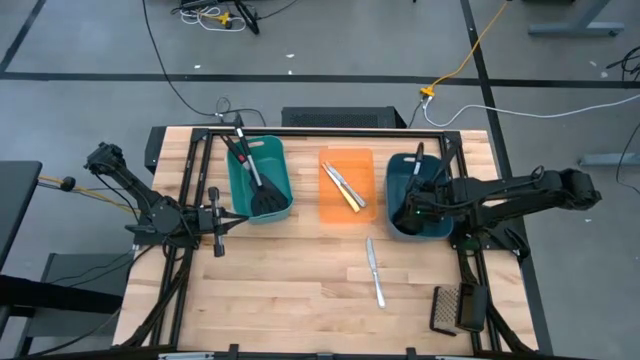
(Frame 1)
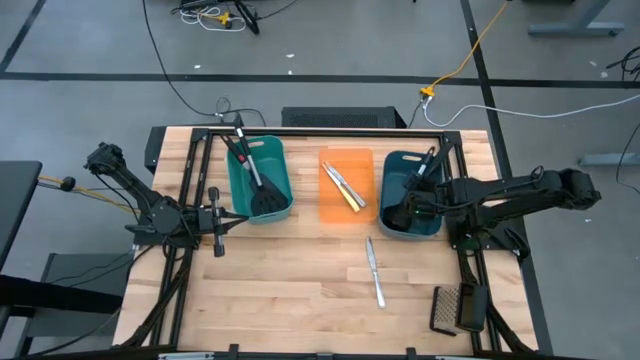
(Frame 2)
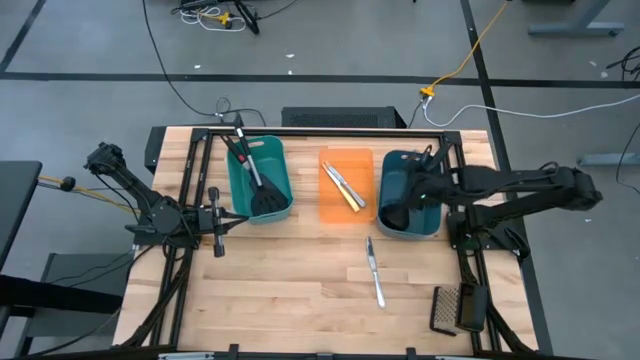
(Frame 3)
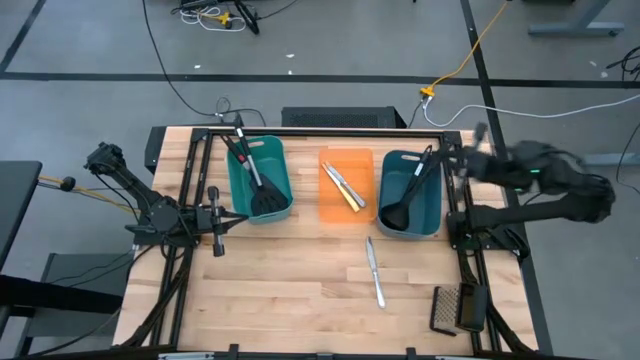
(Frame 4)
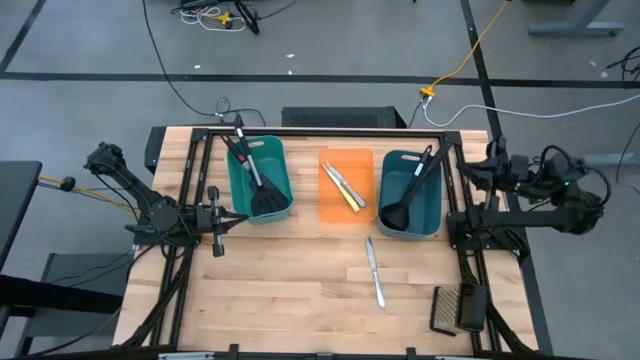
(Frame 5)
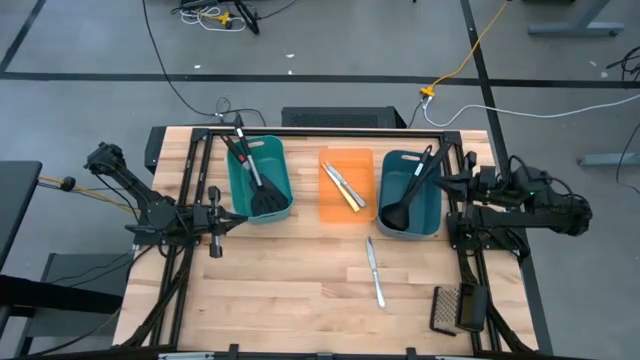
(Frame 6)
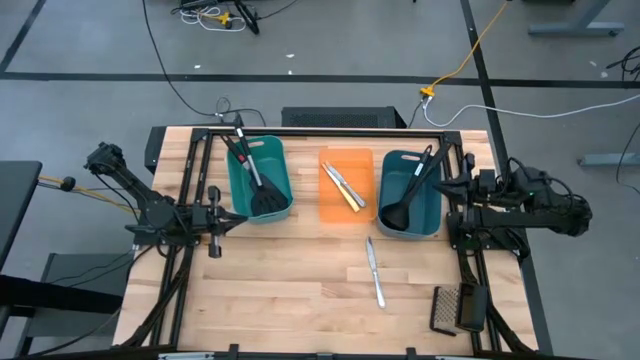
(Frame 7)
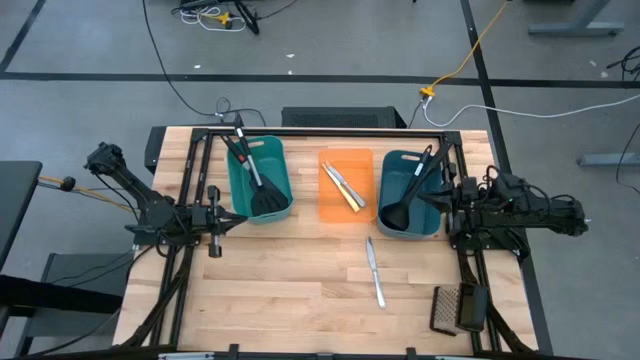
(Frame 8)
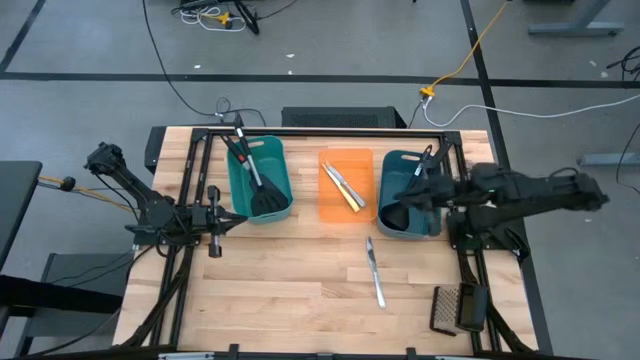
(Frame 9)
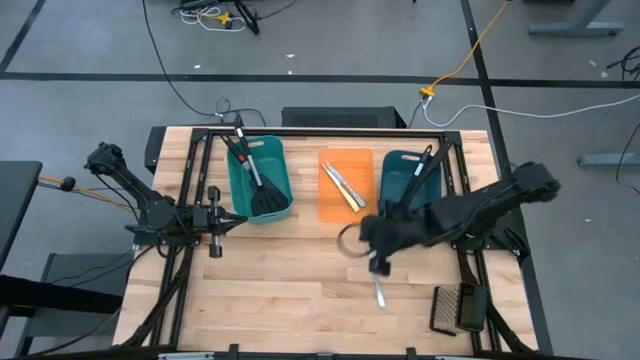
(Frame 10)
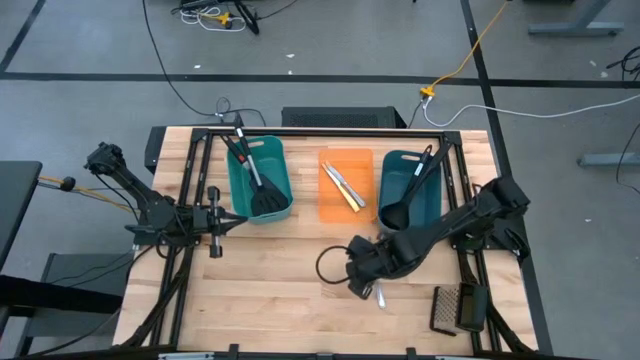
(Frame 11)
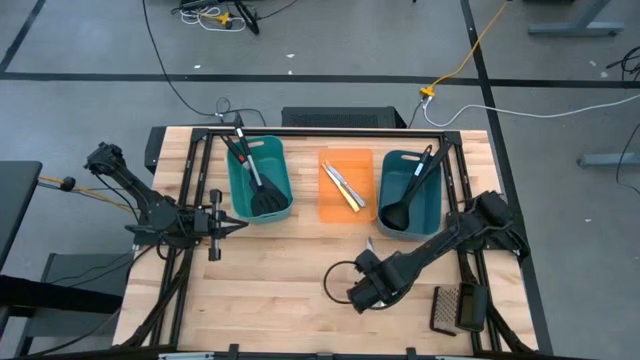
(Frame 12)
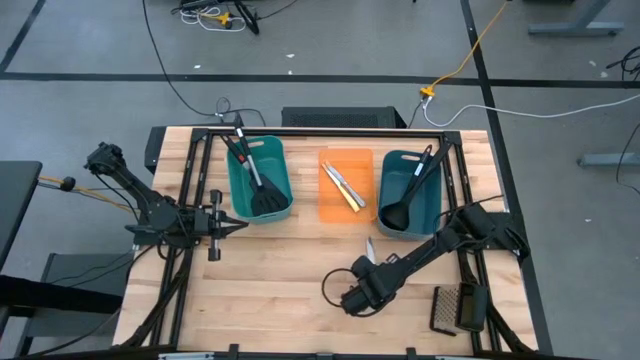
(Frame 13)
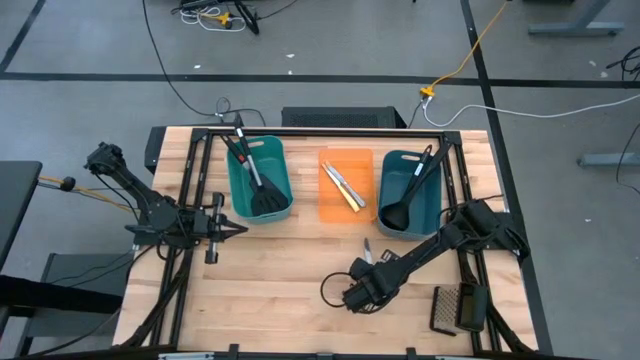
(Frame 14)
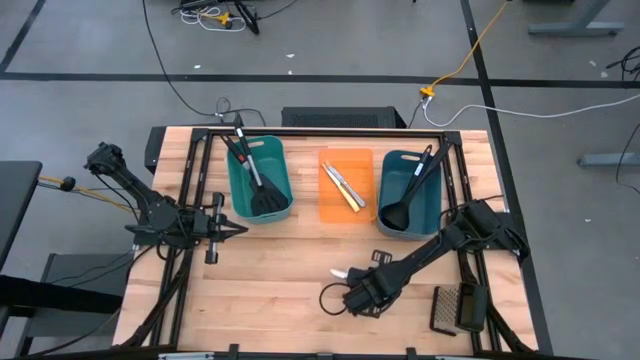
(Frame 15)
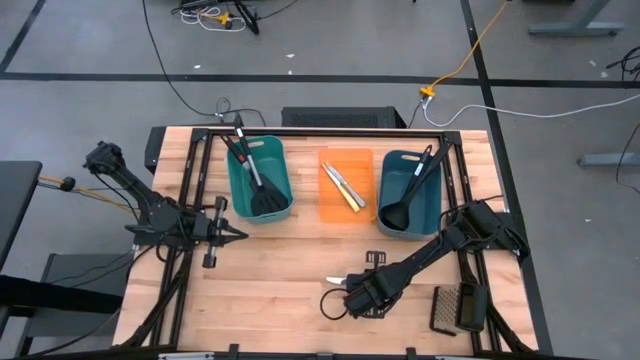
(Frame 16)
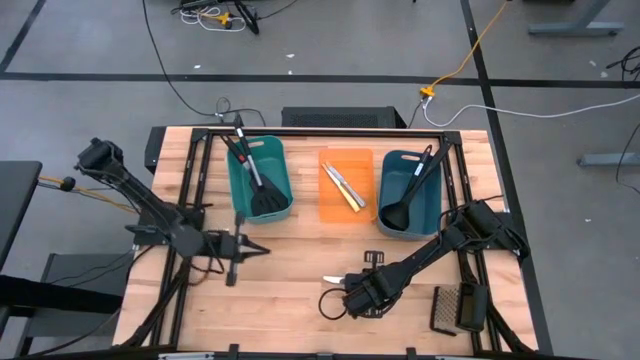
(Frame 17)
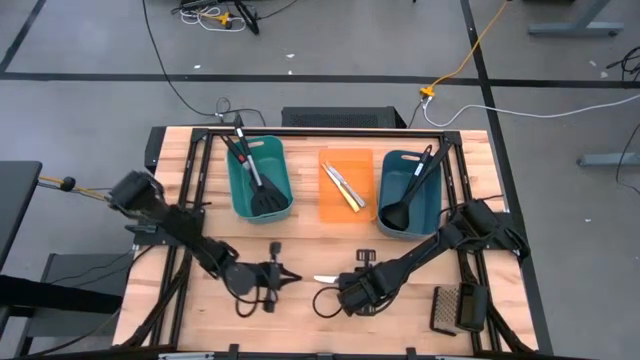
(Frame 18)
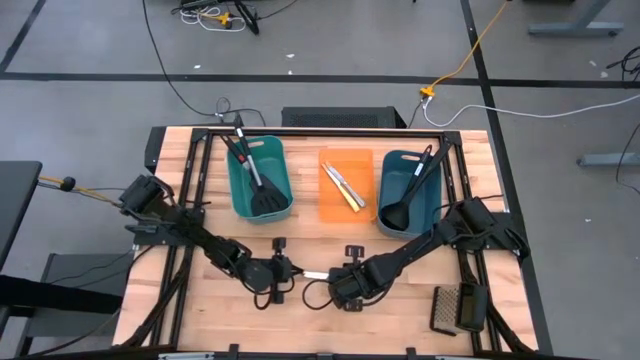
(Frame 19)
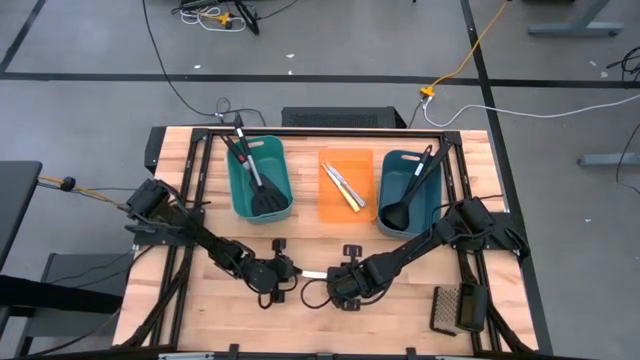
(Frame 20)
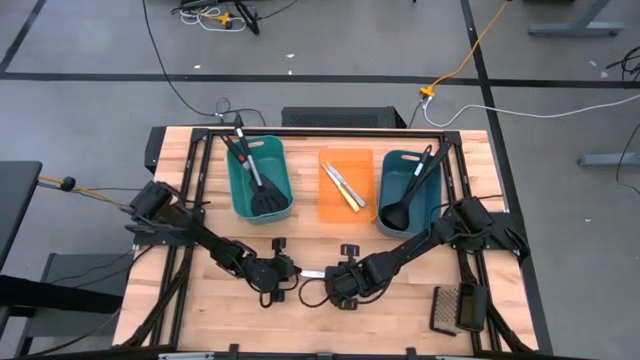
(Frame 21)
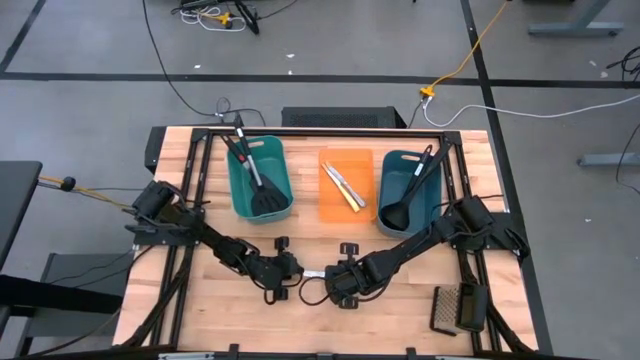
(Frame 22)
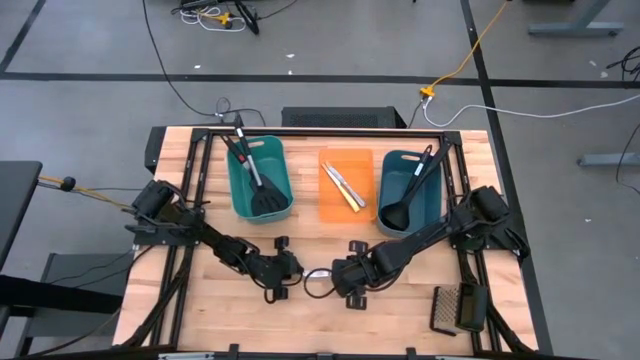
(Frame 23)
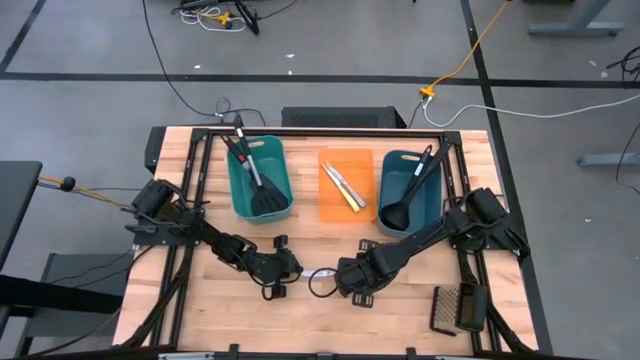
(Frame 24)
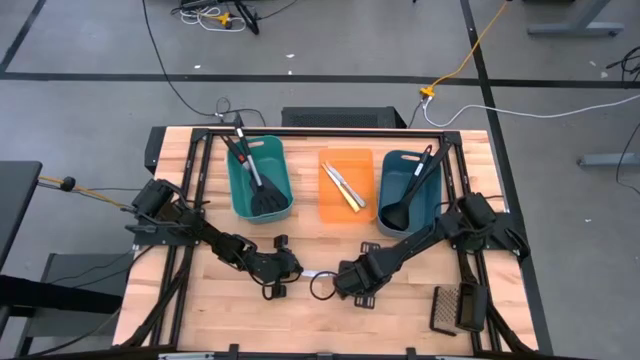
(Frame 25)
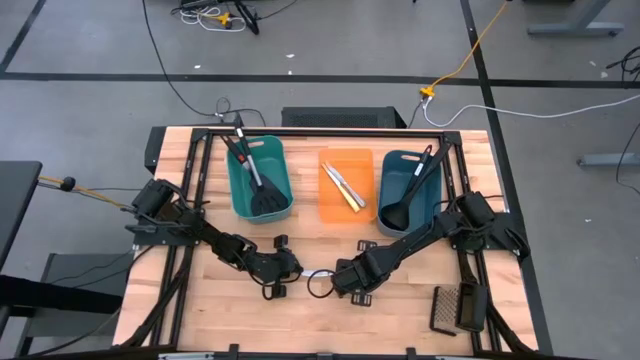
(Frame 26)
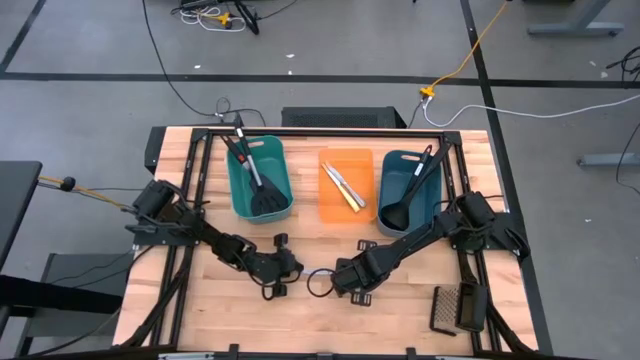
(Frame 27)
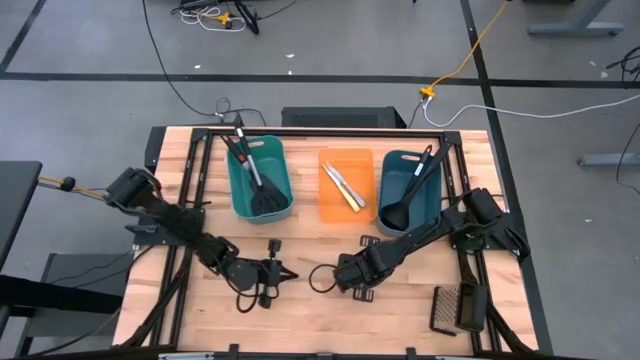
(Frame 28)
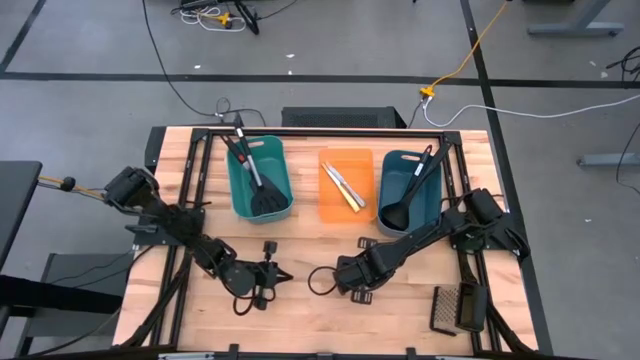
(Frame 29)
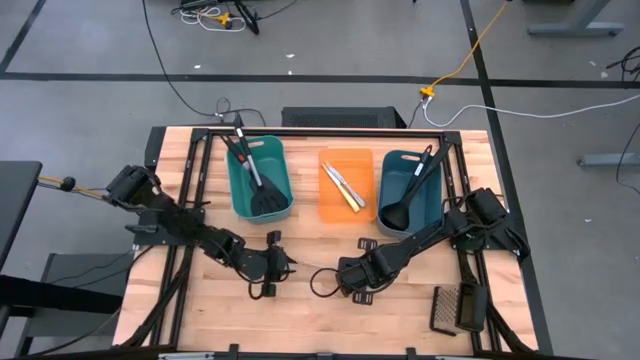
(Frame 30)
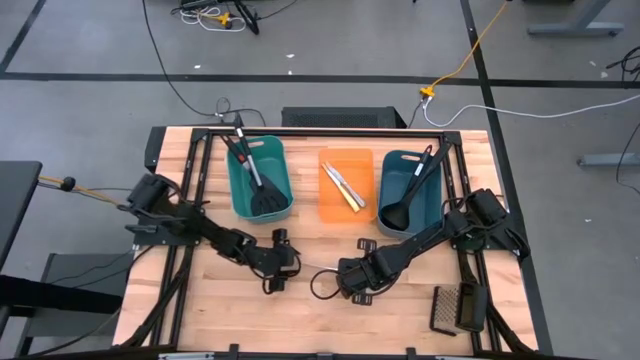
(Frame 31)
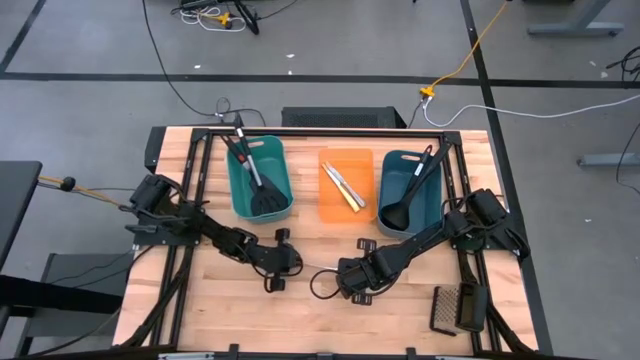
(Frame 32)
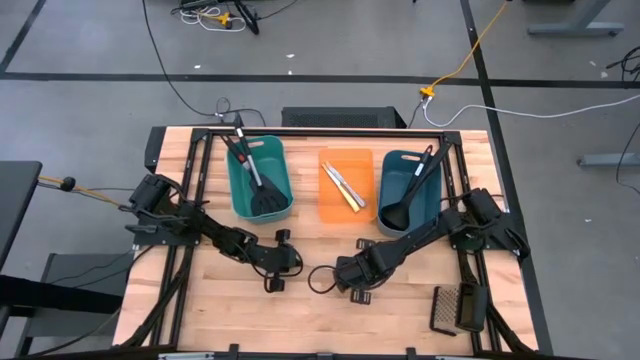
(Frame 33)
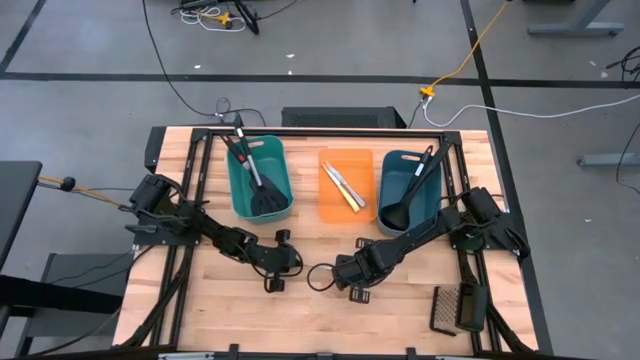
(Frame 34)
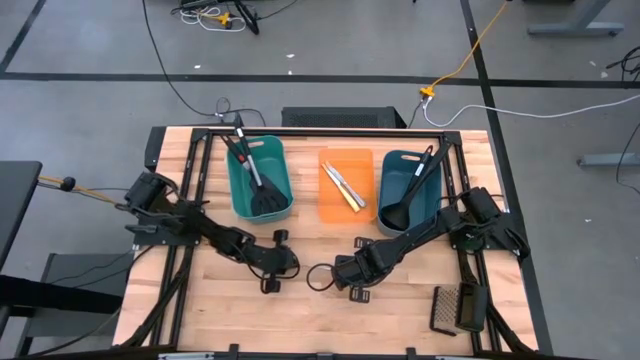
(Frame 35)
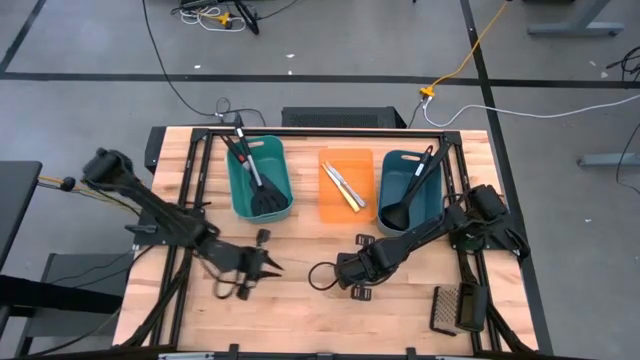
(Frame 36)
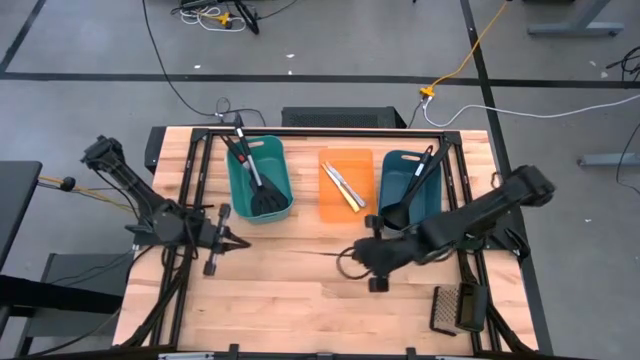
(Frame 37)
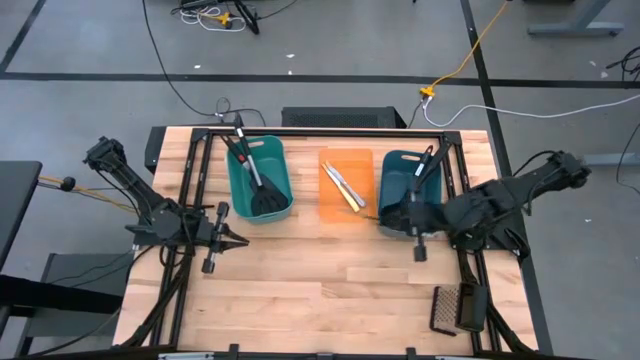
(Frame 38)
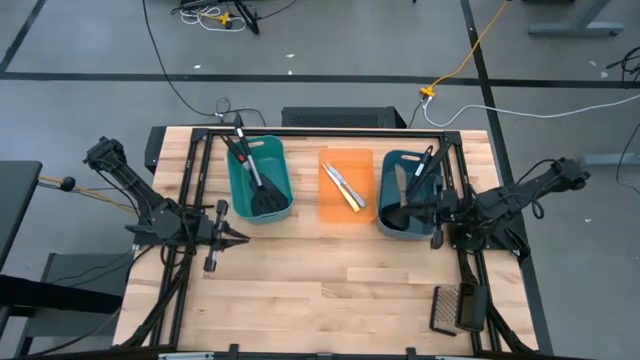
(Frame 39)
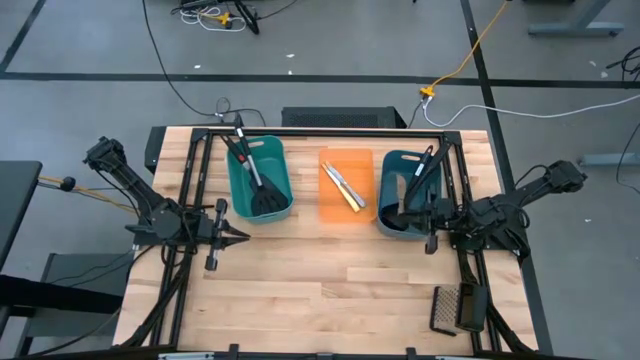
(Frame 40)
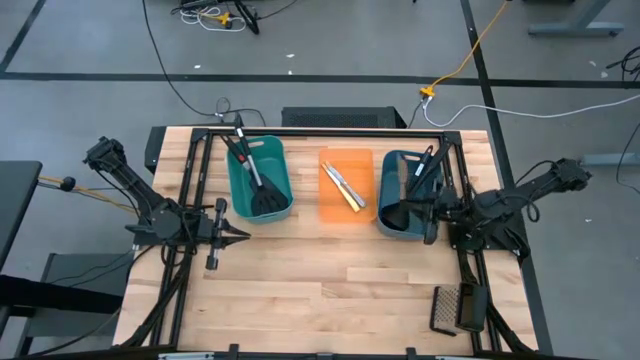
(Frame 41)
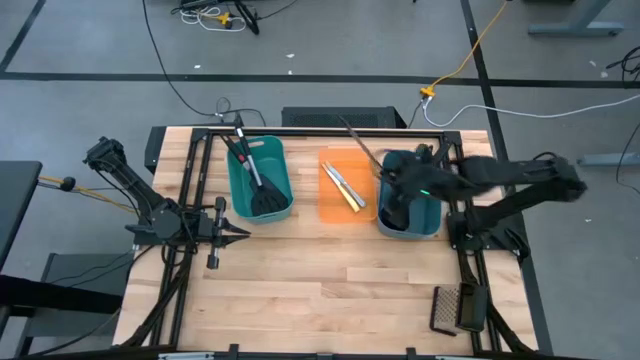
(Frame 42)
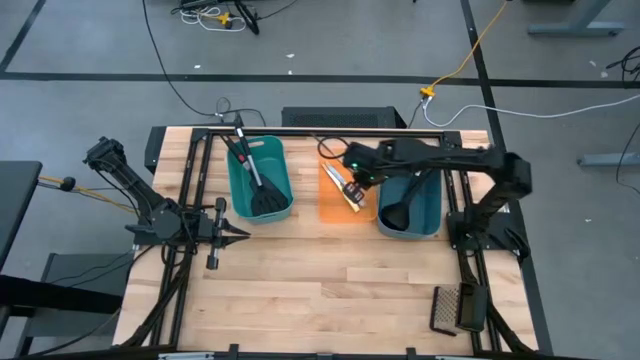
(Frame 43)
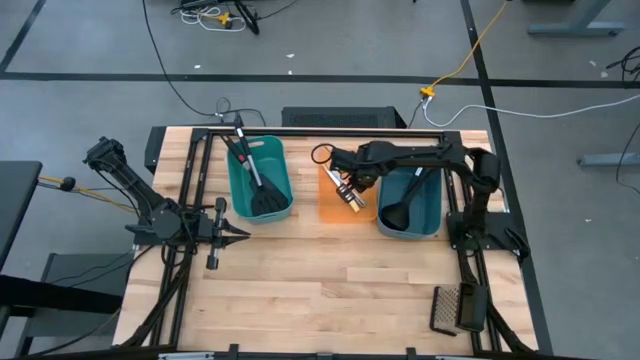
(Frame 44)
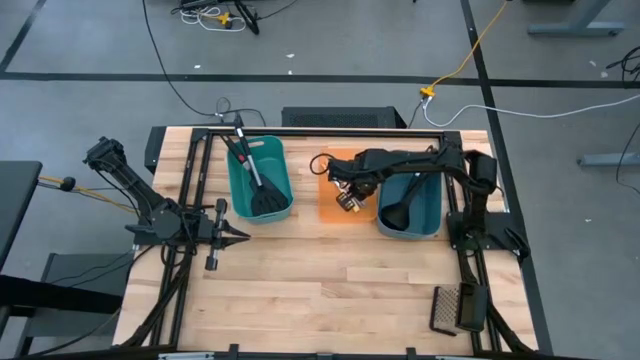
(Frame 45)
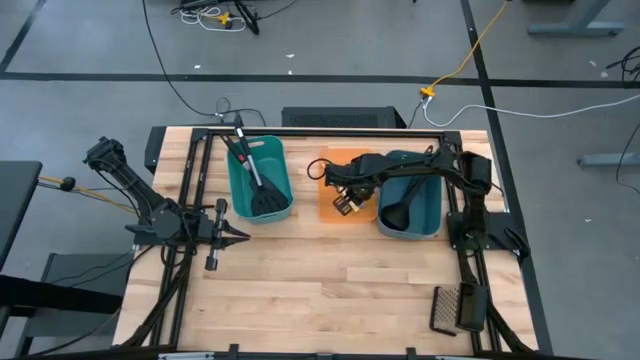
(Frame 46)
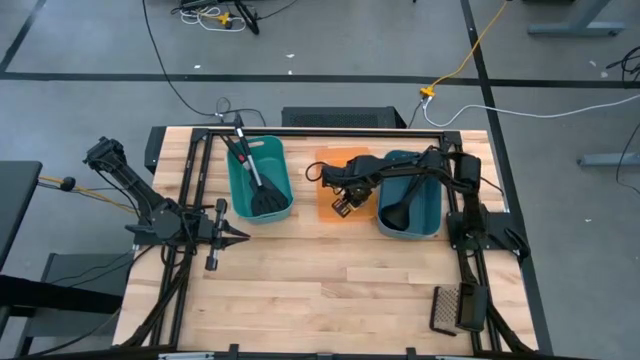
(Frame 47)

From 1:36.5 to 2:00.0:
Task: Pick & Place Kitchen Items
Put the silver table knife into the orange bin
